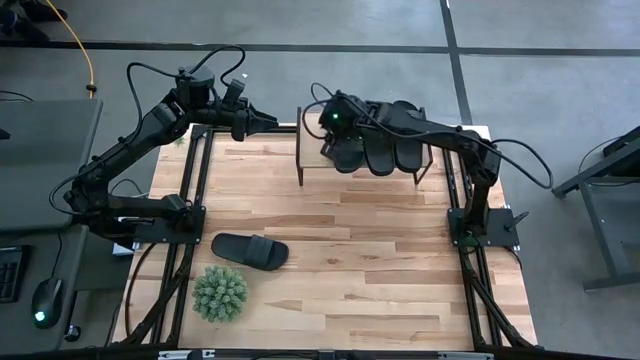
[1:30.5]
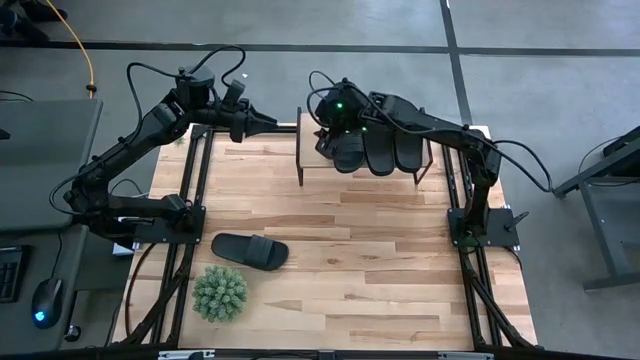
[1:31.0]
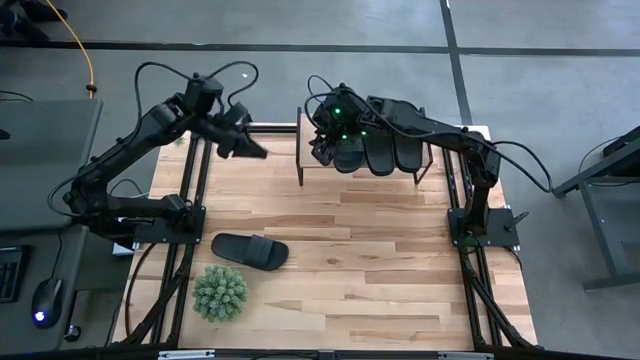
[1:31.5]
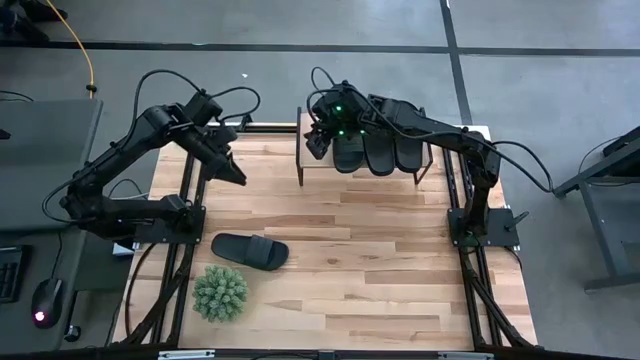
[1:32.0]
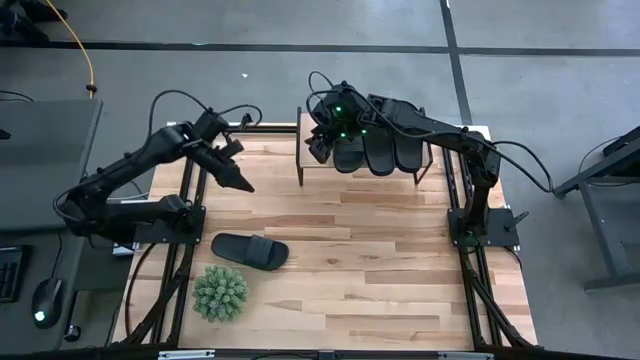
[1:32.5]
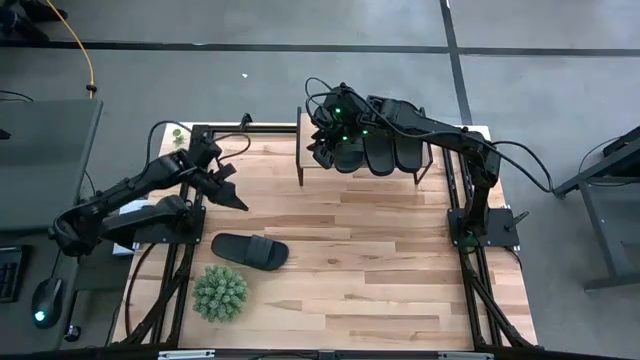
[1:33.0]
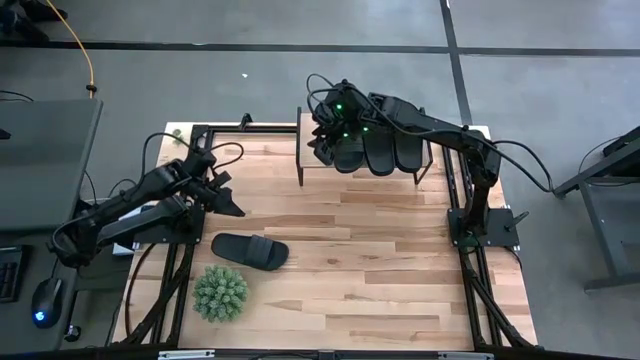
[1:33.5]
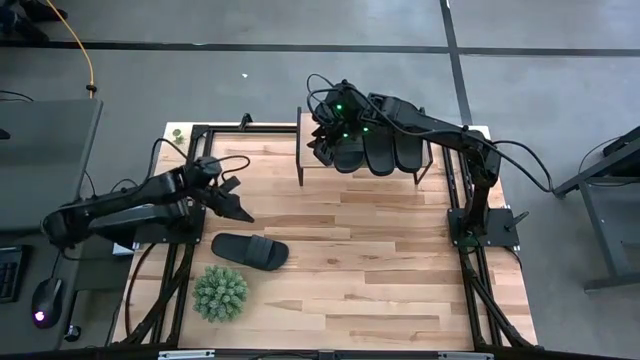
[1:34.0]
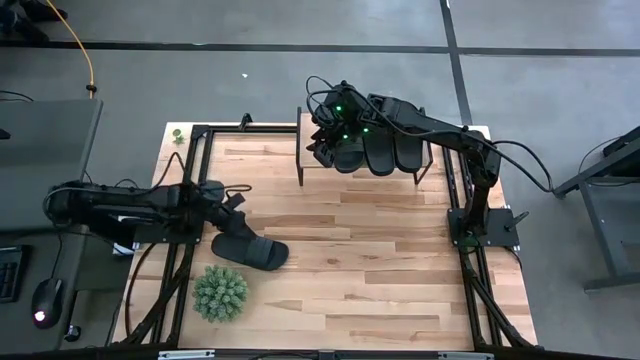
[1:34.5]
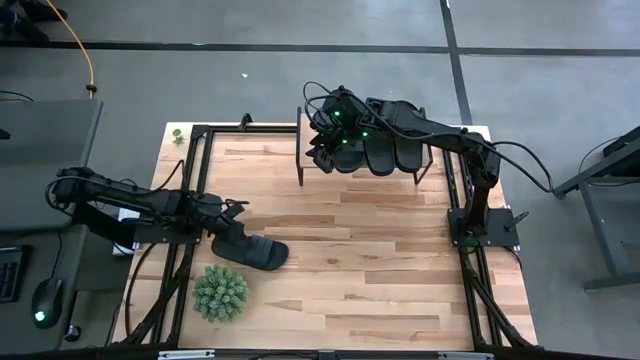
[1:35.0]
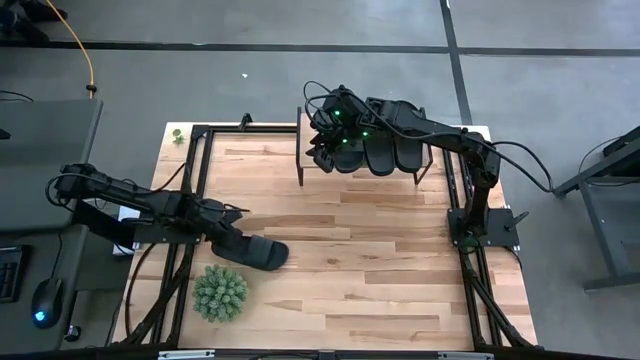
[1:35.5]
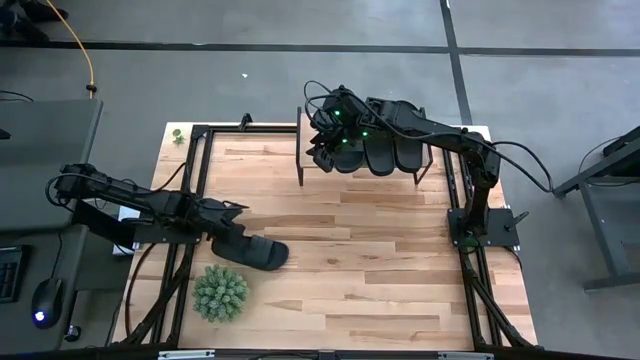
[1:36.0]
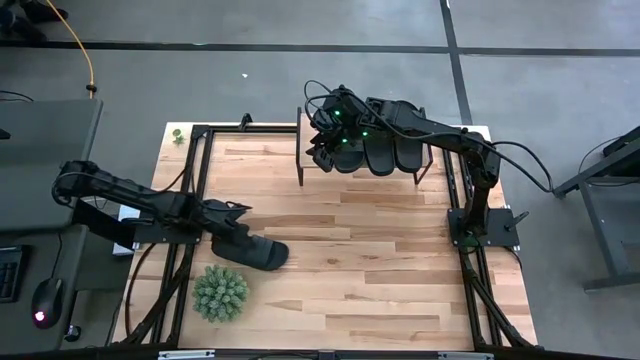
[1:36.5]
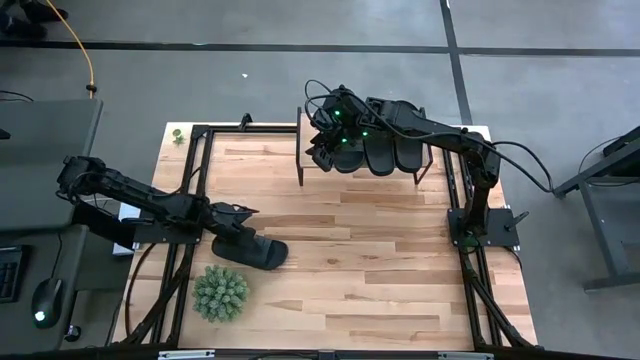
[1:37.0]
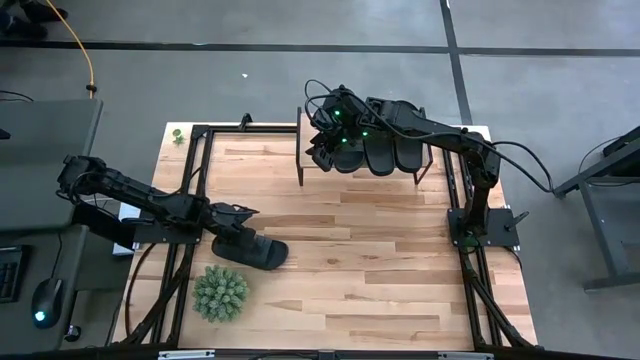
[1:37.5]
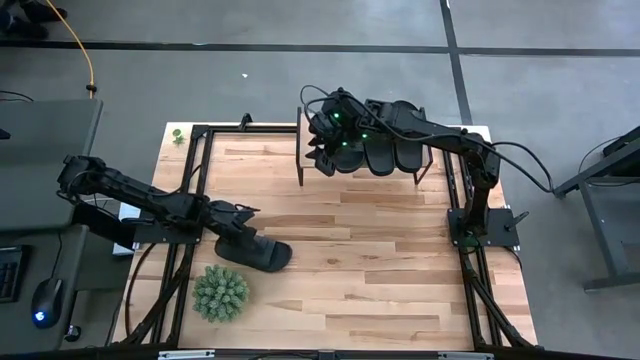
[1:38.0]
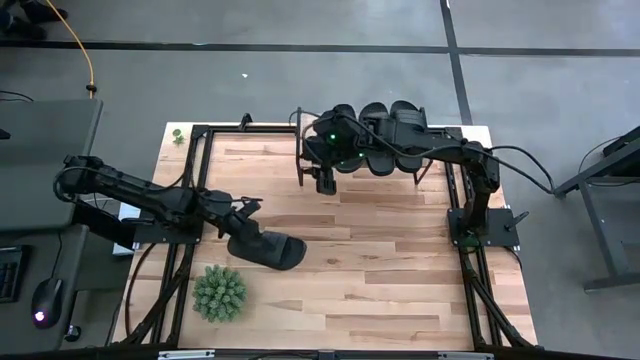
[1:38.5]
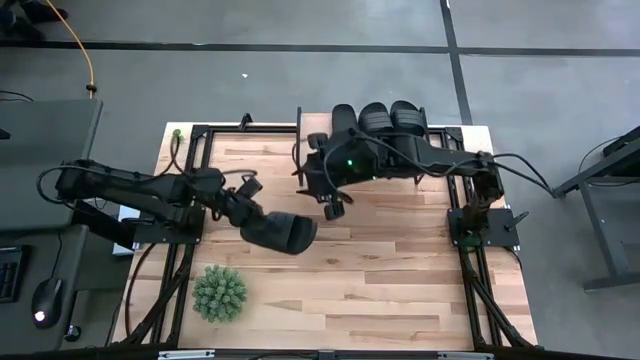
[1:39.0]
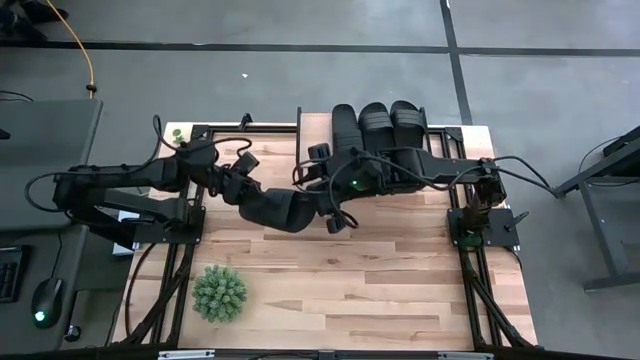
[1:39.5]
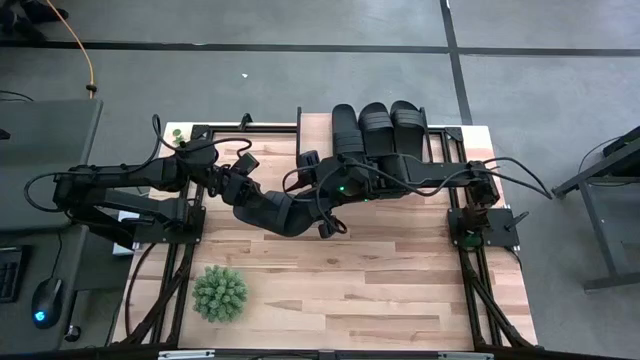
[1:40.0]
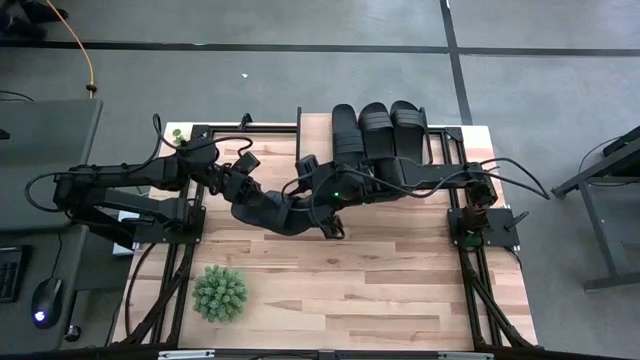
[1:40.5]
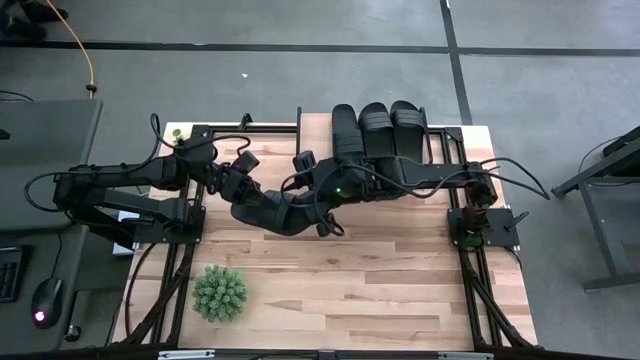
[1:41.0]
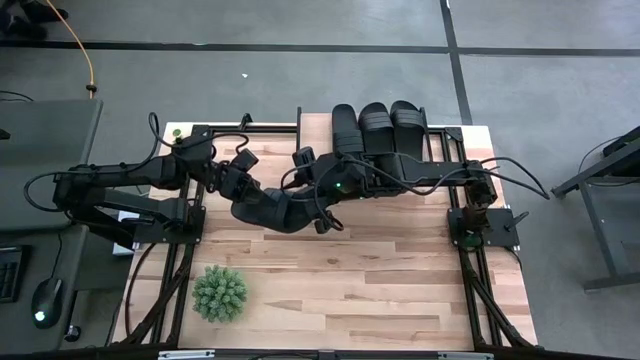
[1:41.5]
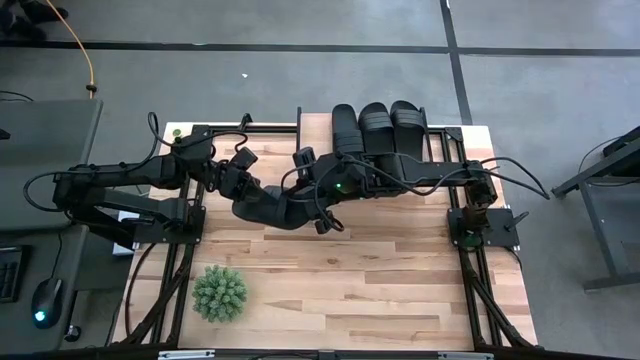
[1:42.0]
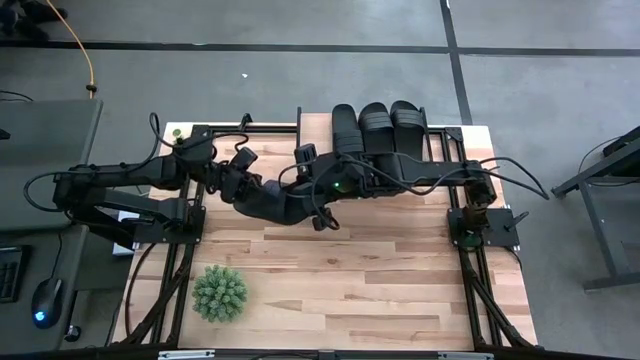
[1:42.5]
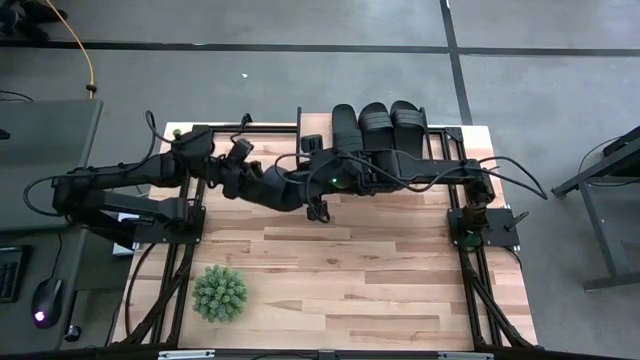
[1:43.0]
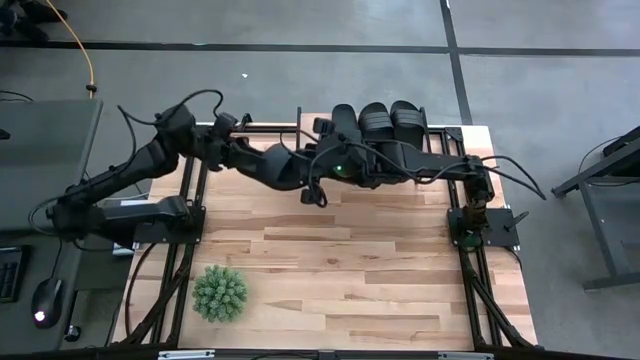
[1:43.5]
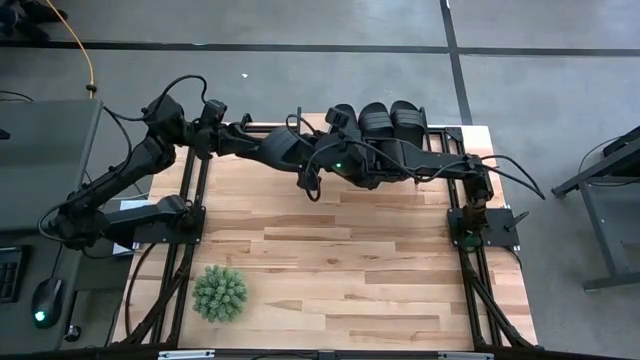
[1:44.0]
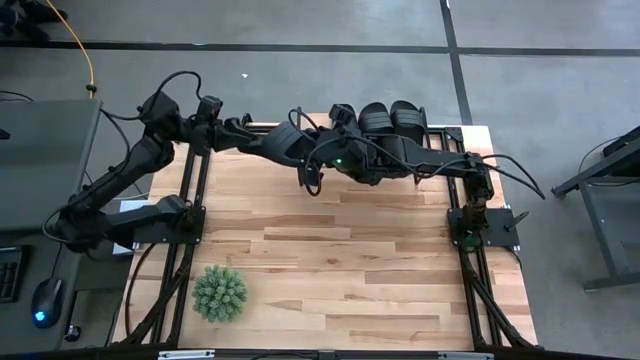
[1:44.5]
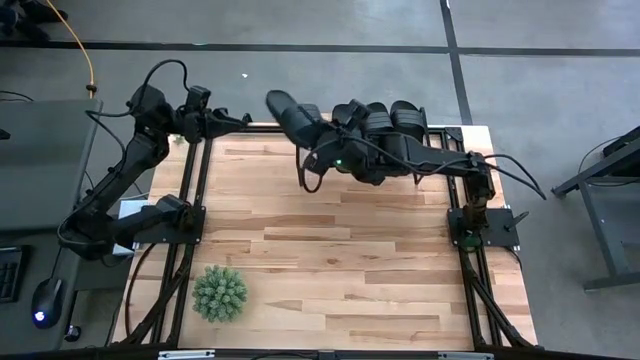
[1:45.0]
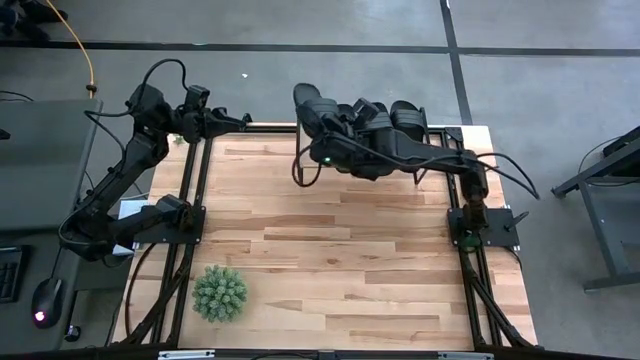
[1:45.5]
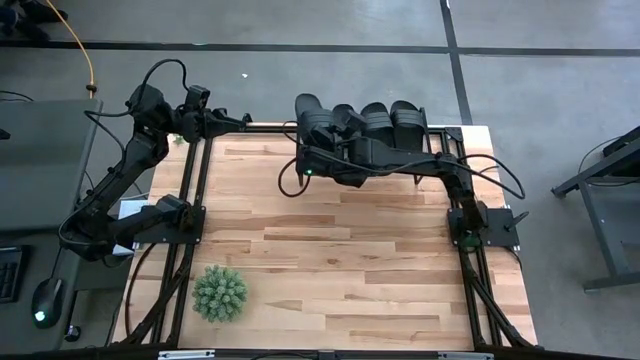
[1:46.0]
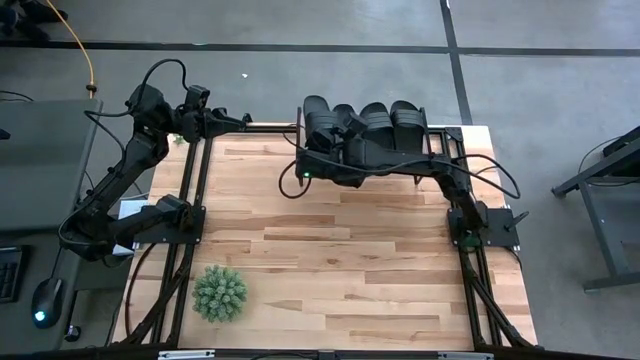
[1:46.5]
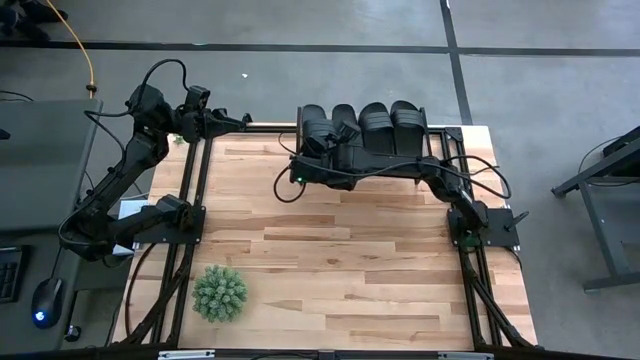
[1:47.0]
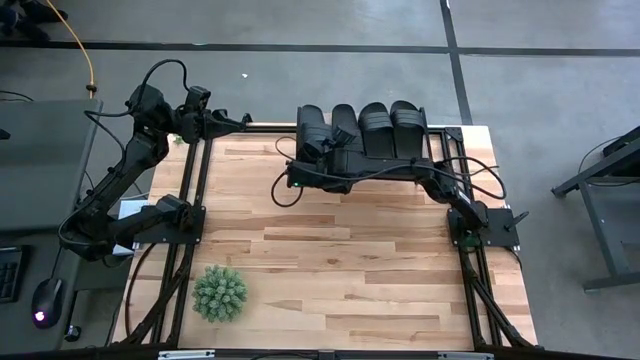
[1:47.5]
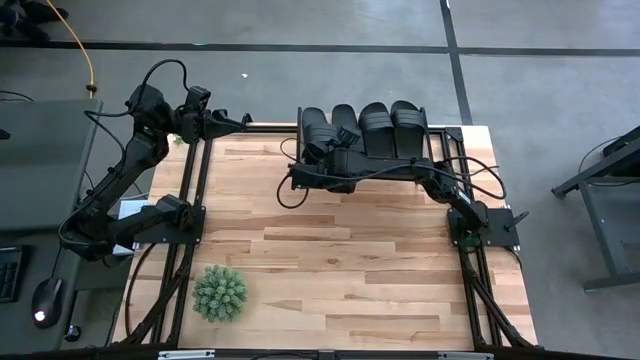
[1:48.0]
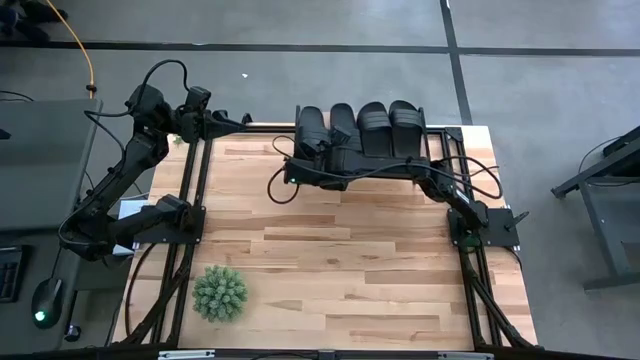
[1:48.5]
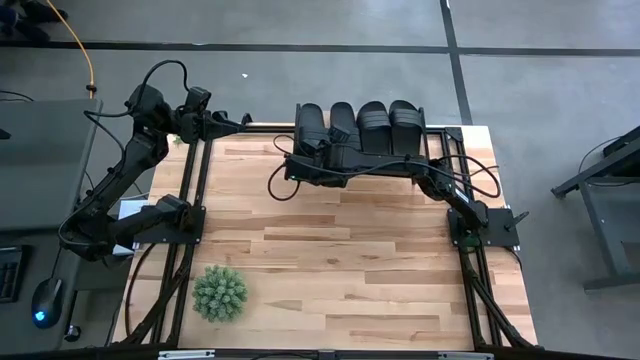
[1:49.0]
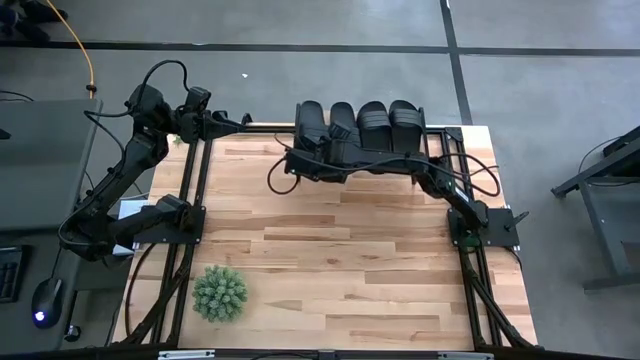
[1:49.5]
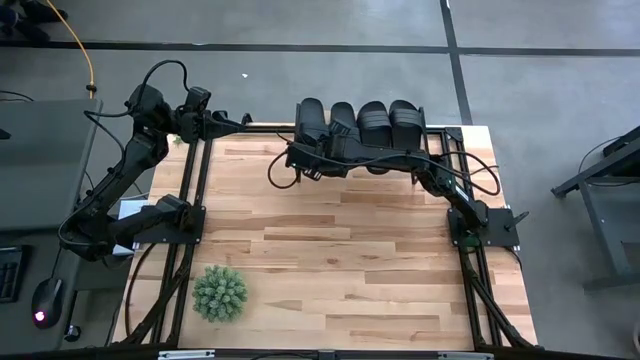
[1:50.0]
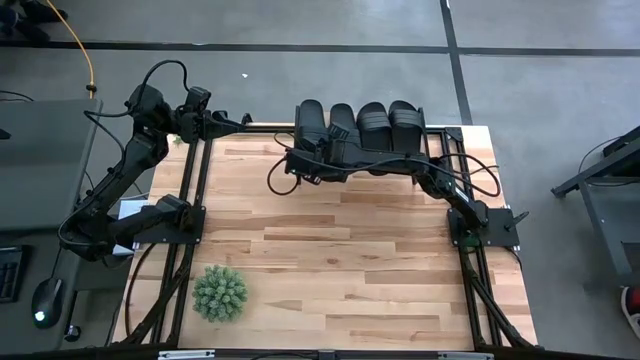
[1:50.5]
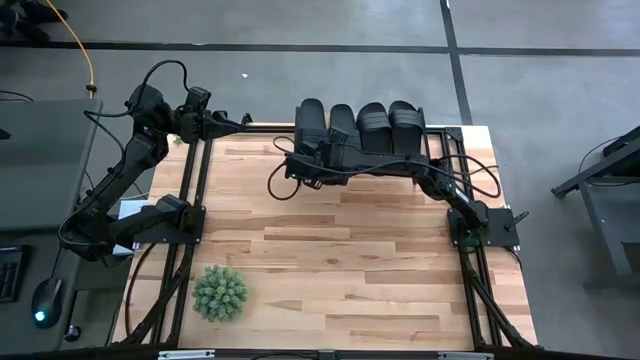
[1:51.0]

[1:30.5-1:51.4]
Task: Pick and place slides into the shelf
Put the black slipper on the shelf
